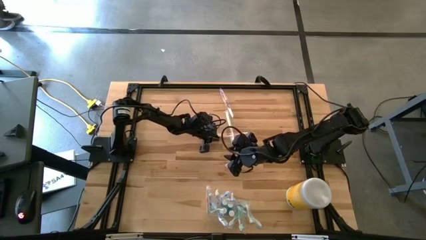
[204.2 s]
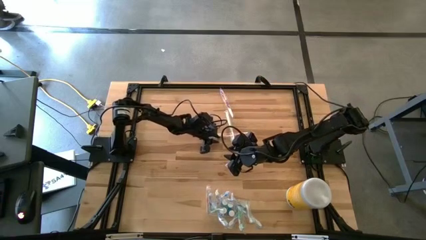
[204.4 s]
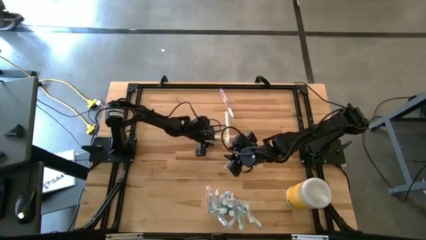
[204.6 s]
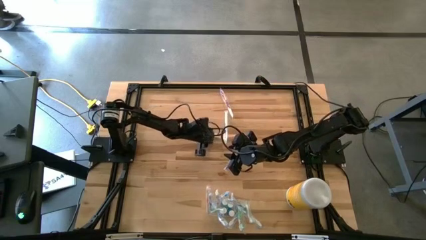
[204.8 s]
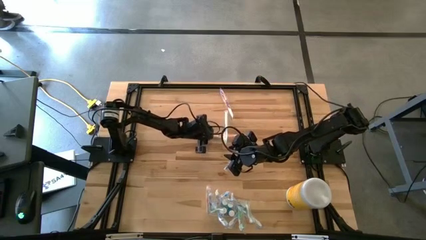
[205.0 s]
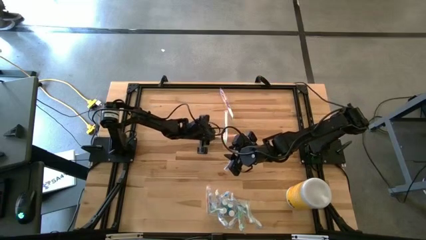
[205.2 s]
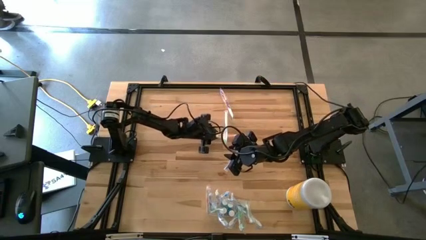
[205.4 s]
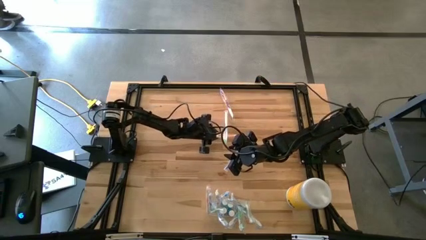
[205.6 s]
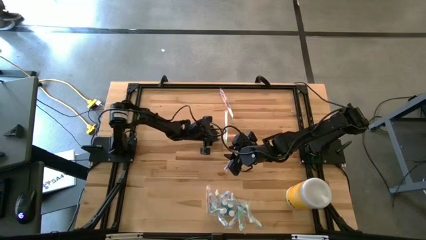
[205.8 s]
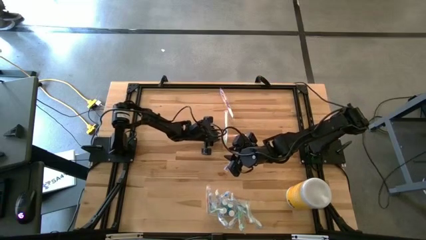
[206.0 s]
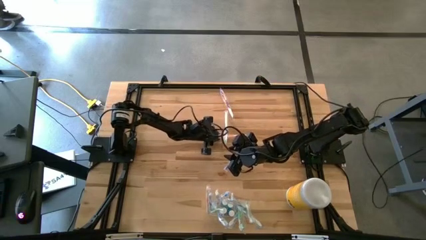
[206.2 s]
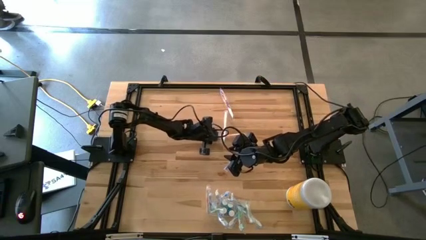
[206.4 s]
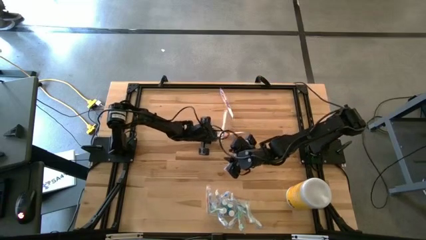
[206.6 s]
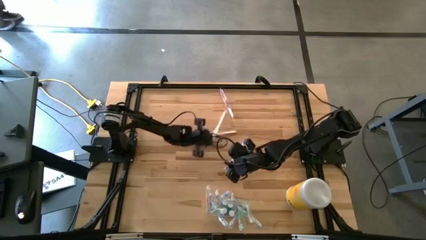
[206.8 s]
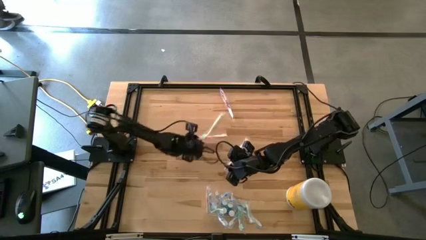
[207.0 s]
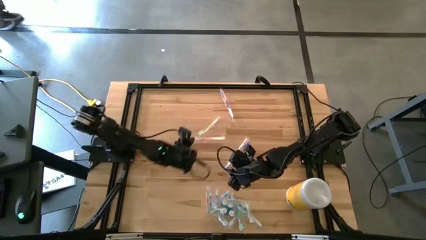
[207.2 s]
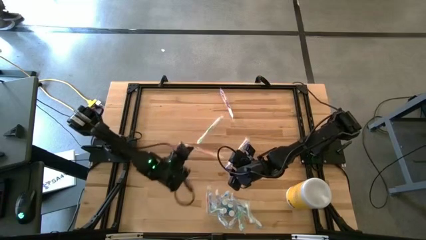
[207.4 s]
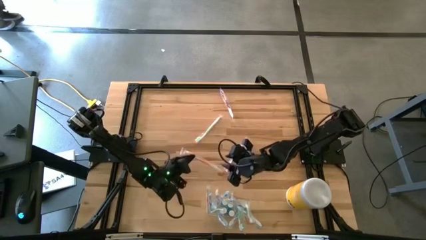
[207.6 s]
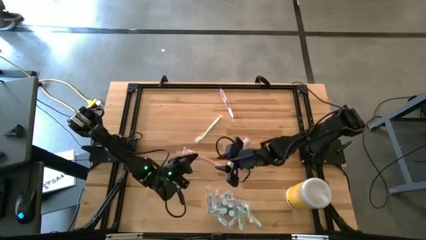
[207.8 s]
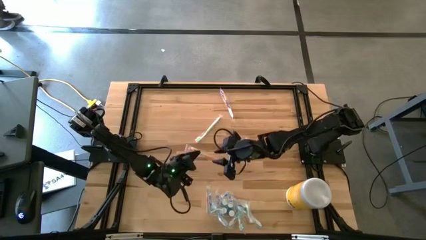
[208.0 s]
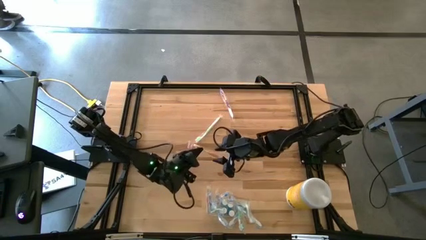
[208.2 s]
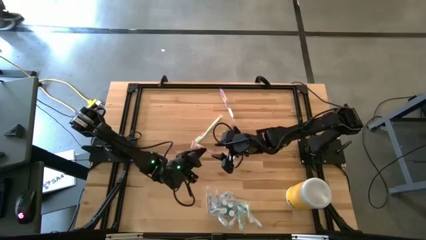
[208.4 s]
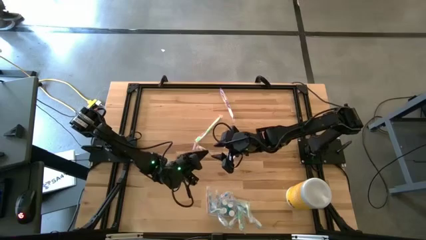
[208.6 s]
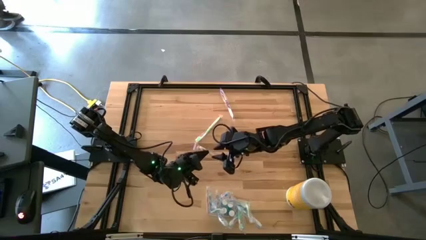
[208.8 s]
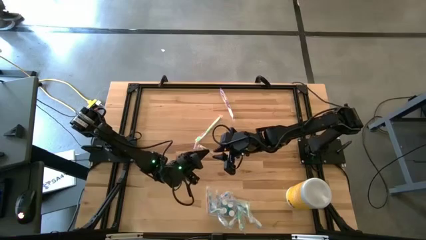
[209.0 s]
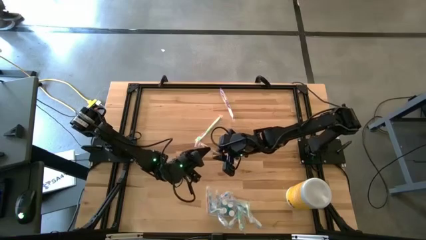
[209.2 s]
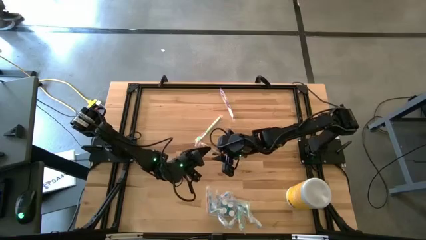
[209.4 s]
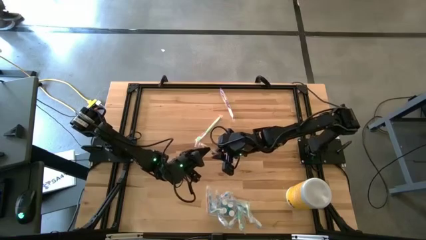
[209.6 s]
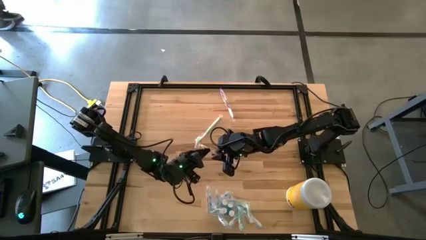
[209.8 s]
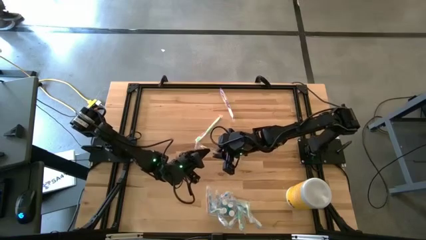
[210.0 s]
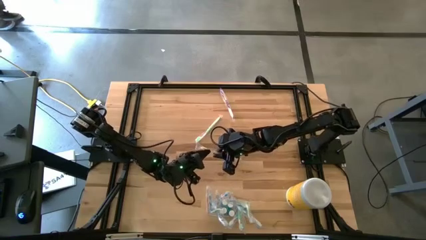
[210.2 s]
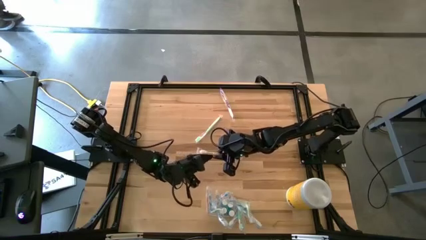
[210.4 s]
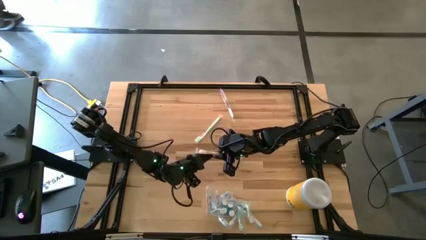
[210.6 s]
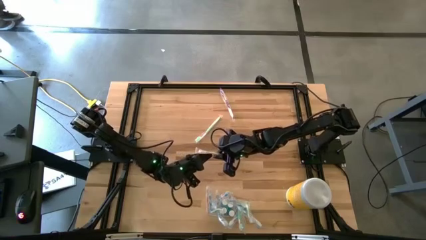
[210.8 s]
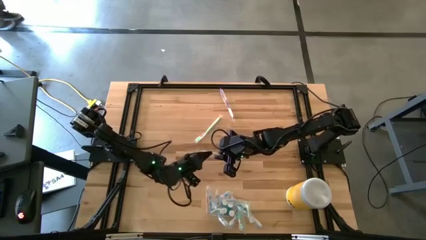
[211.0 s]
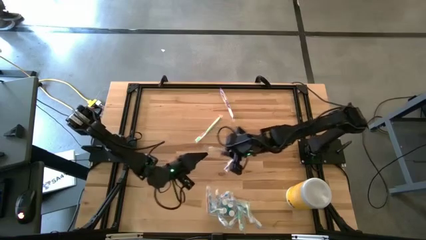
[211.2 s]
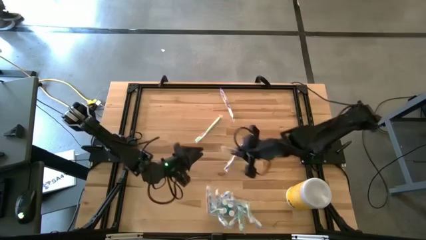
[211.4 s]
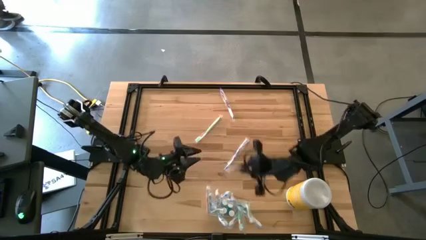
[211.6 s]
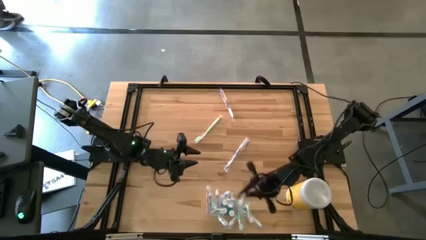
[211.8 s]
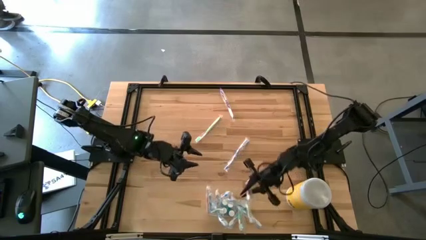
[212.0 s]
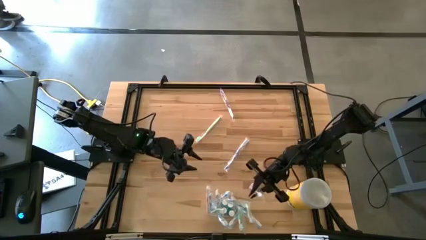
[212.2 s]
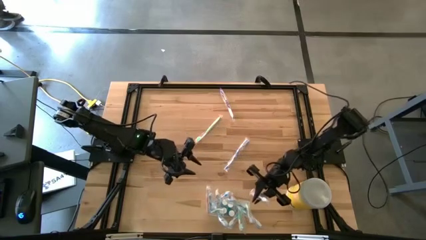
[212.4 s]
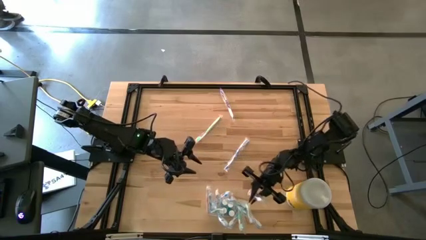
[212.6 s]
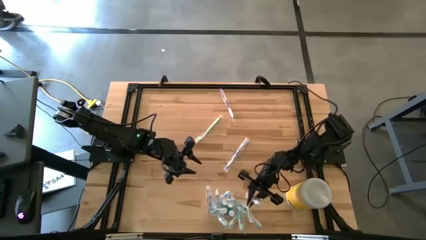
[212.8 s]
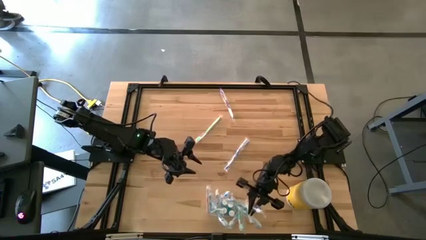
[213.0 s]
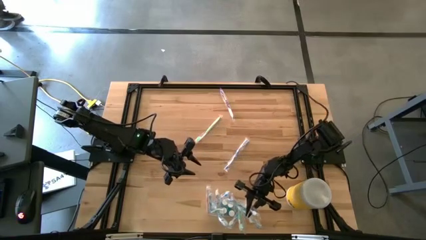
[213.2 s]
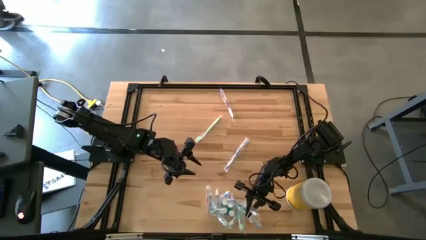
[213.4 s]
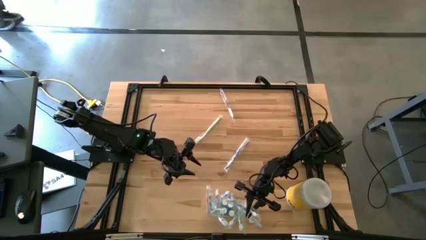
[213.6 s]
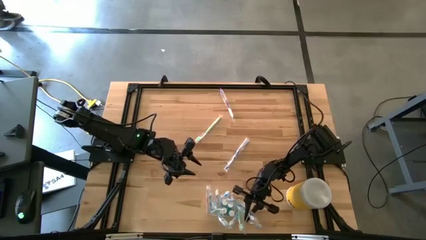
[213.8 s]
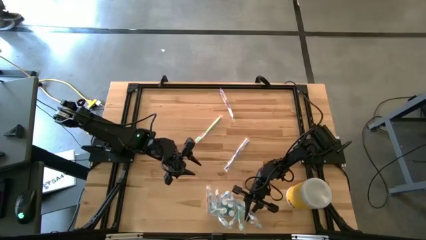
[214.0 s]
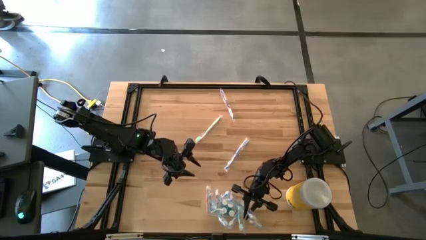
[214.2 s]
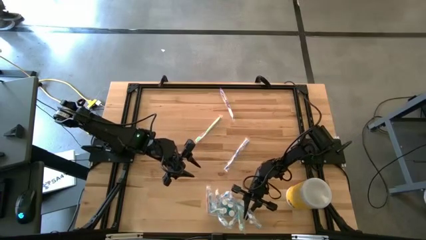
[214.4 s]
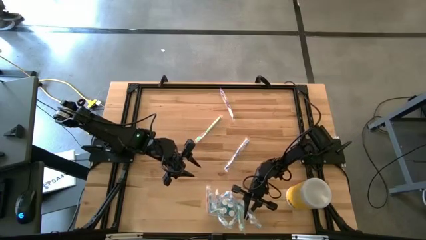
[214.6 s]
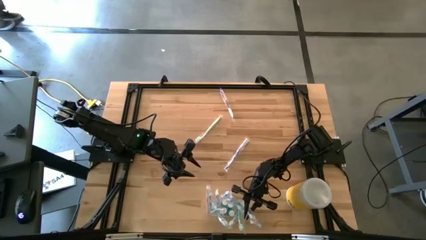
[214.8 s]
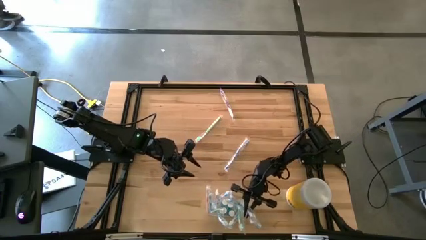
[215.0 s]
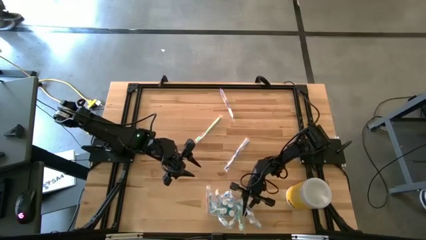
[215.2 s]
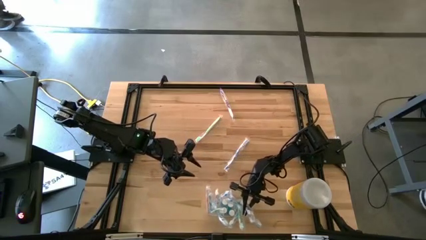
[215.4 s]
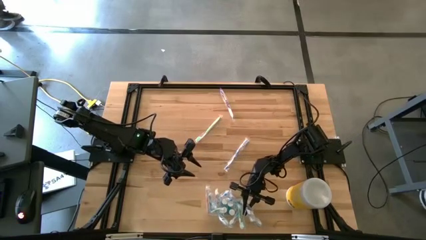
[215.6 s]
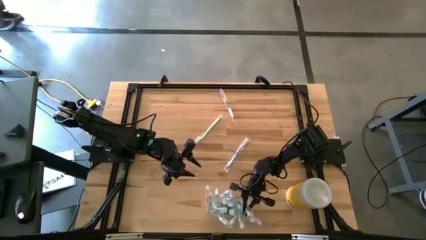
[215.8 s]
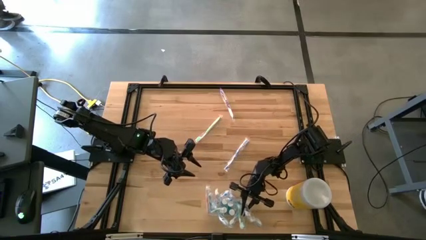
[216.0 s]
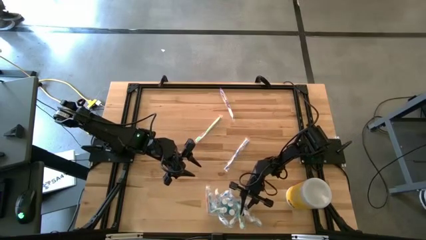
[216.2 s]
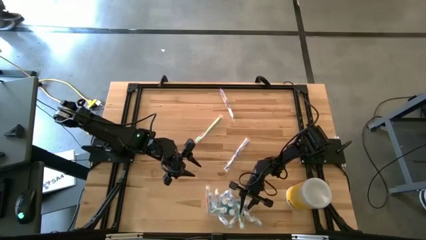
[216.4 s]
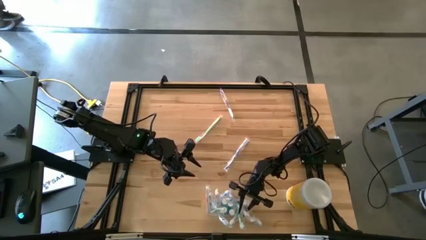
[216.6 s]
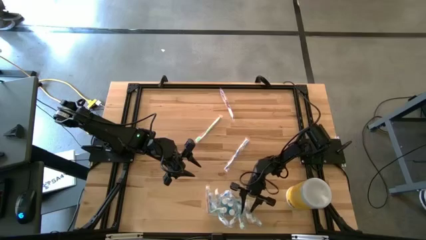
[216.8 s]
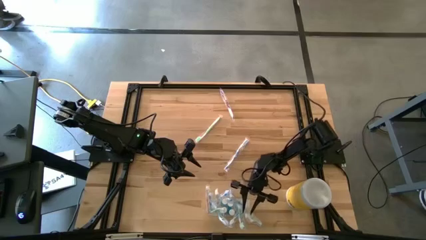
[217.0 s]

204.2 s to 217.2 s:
Task: Pick & Place toothbrushing station
Put the orange toothbrush into the transparent organizer

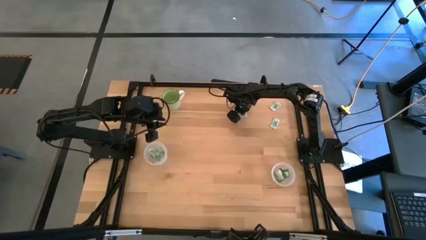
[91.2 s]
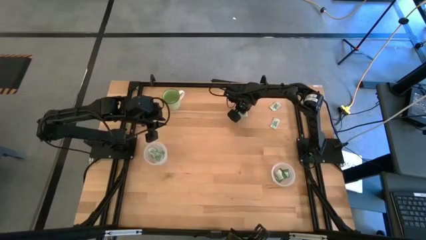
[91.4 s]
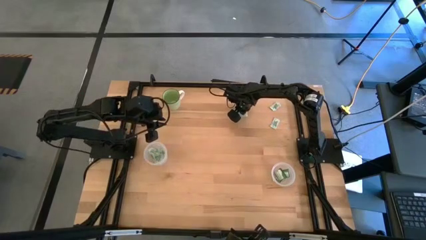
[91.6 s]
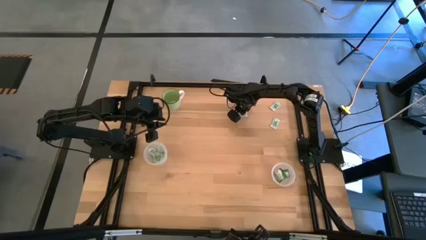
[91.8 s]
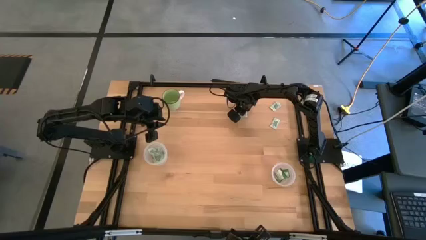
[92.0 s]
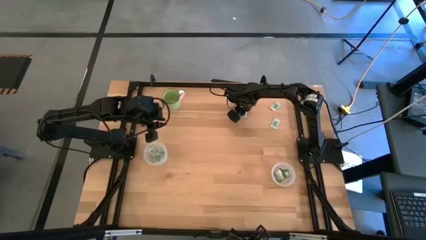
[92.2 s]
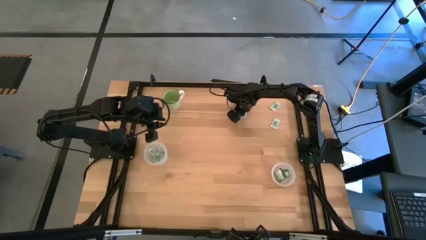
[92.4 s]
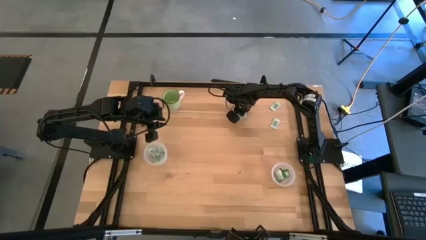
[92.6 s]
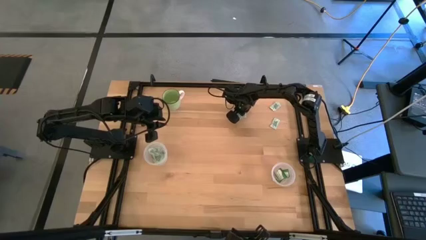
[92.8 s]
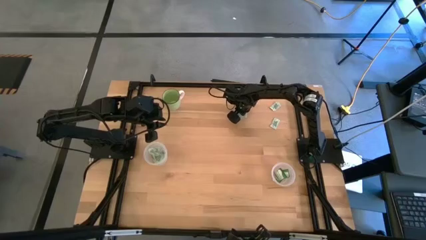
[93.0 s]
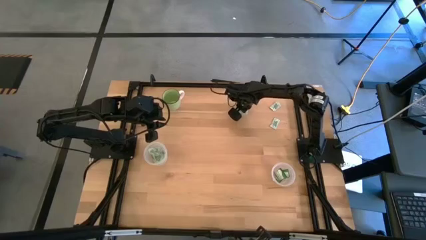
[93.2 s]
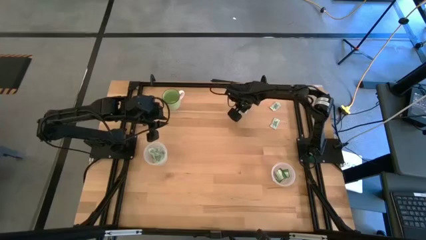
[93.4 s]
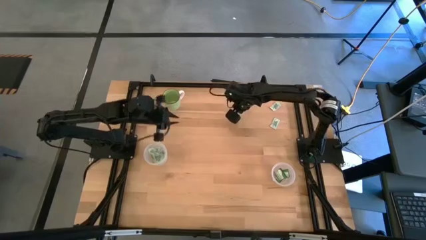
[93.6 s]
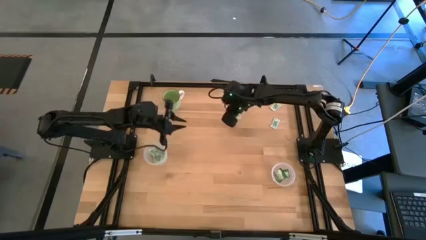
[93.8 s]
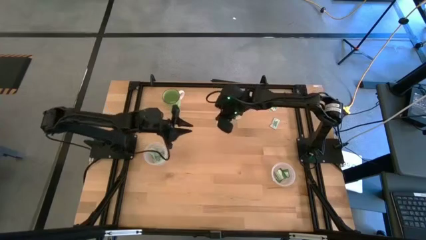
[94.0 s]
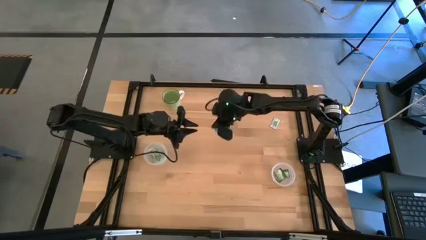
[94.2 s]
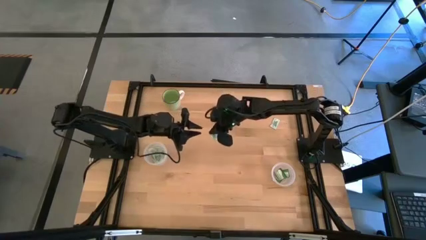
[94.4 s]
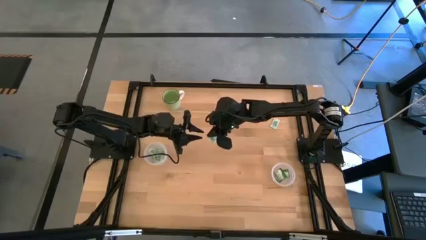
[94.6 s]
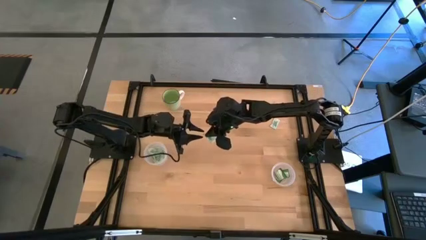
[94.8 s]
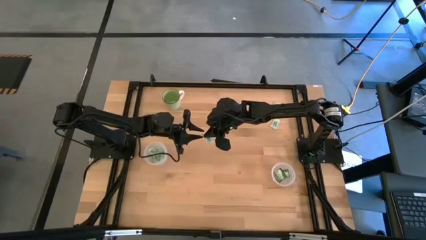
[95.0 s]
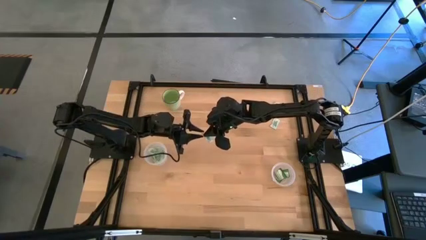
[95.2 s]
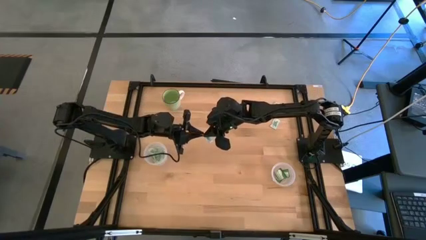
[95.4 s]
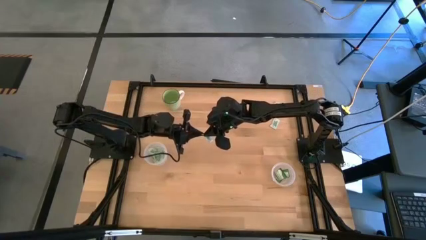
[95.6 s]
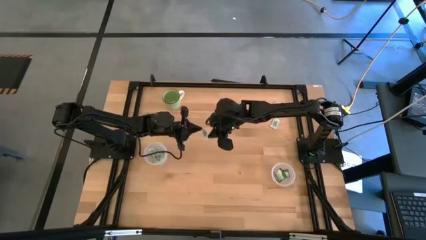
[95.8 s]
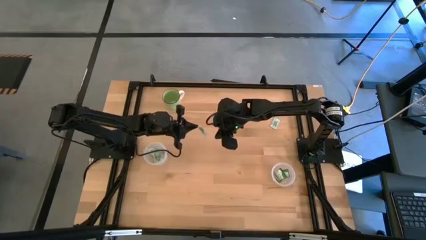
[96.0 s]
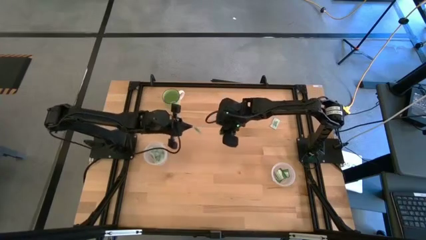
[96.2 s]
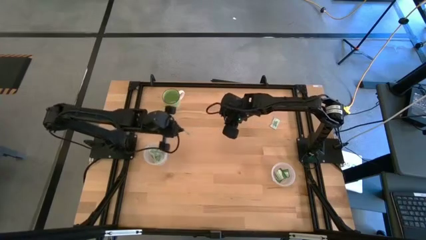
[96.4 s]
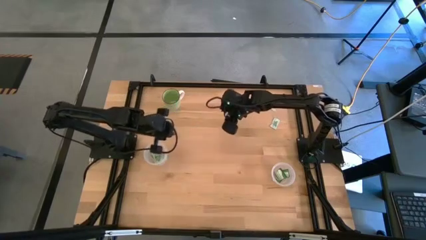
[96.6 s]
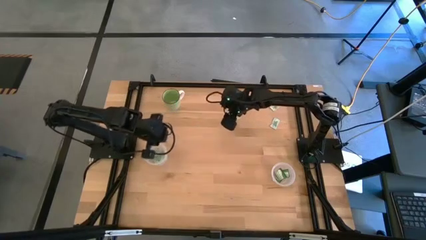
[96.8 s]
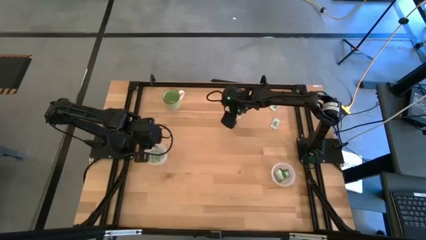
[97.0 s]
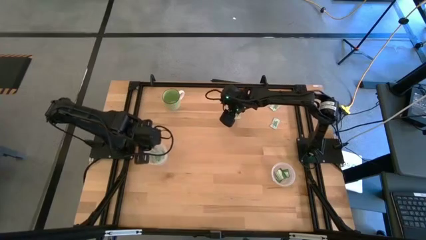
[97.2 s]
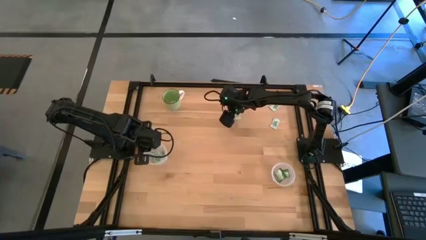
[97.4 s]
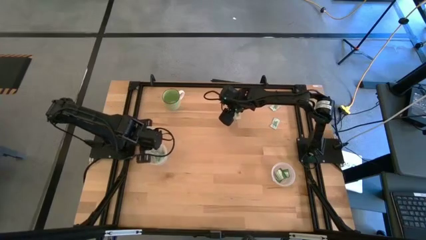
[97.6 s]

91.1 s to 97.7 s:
Task: Pick and place items into bin
Put the stevia packet into the left transparent bin
